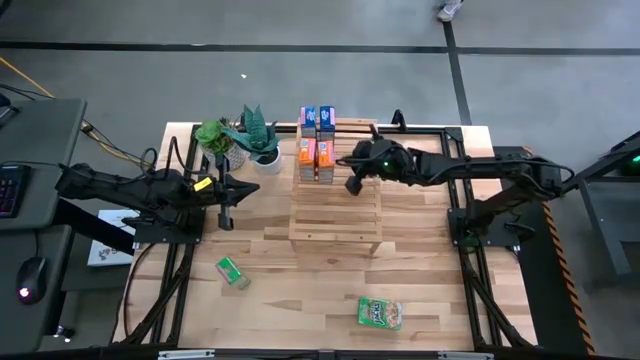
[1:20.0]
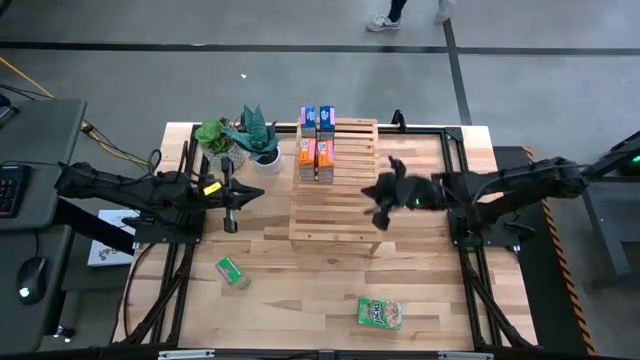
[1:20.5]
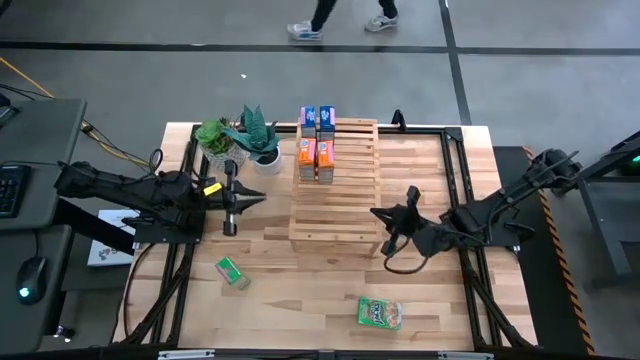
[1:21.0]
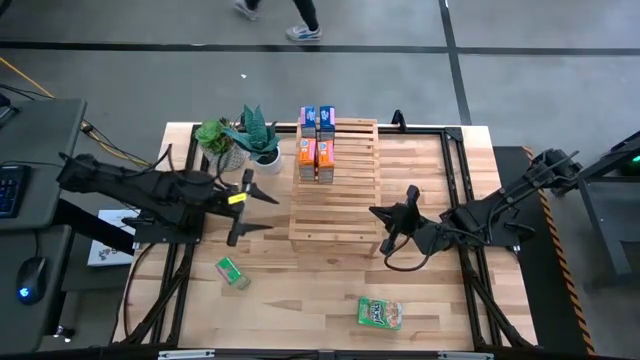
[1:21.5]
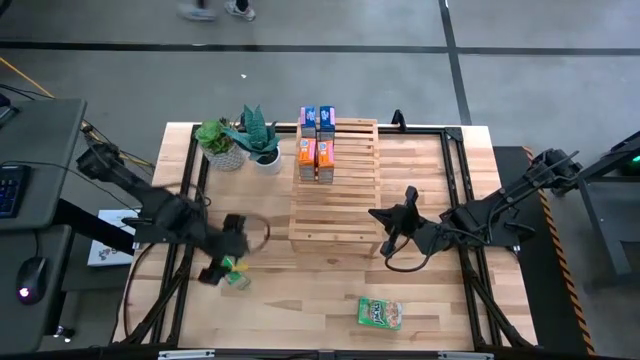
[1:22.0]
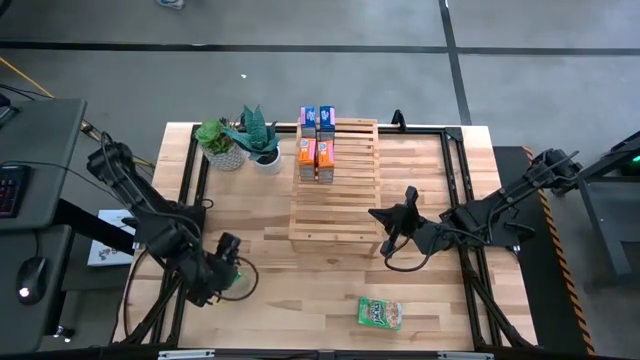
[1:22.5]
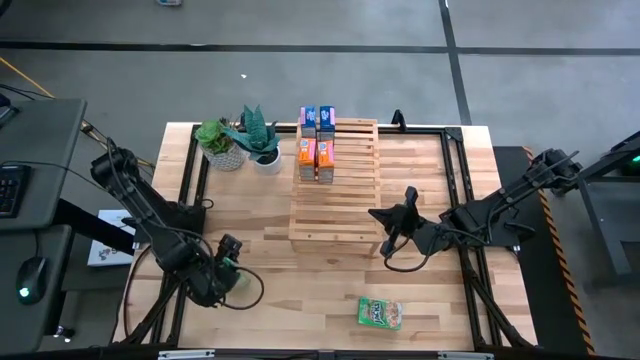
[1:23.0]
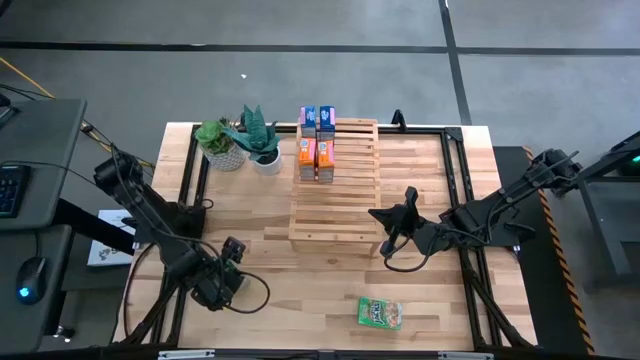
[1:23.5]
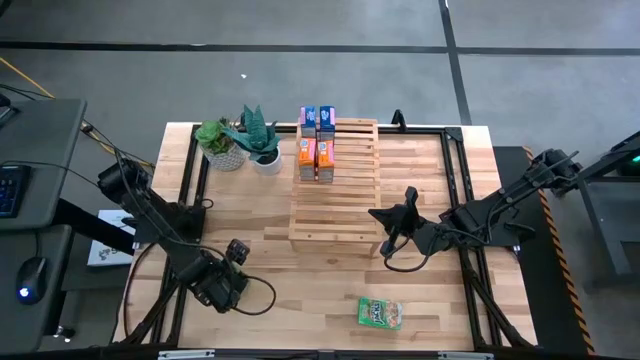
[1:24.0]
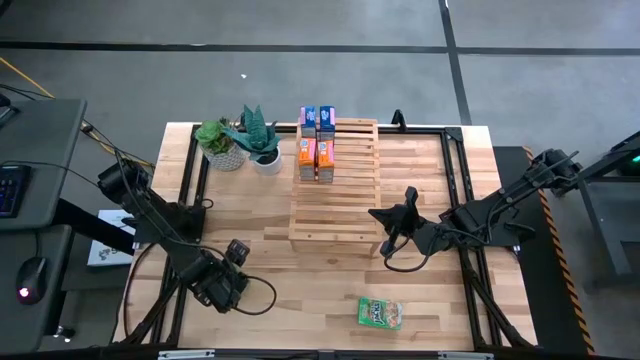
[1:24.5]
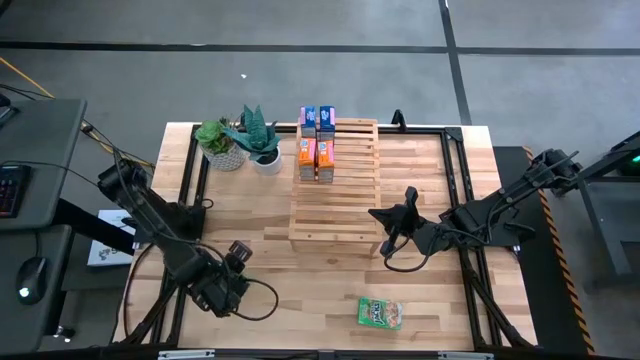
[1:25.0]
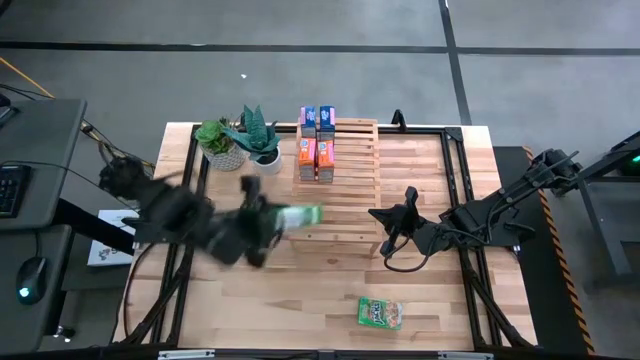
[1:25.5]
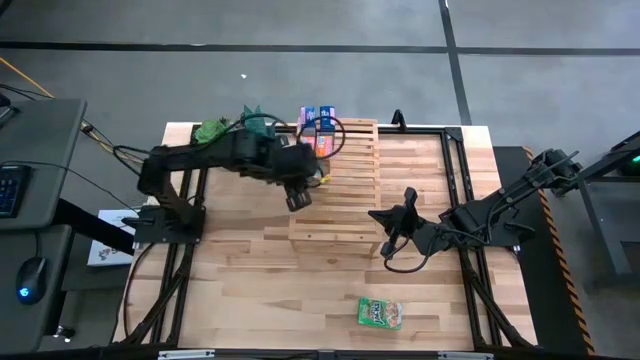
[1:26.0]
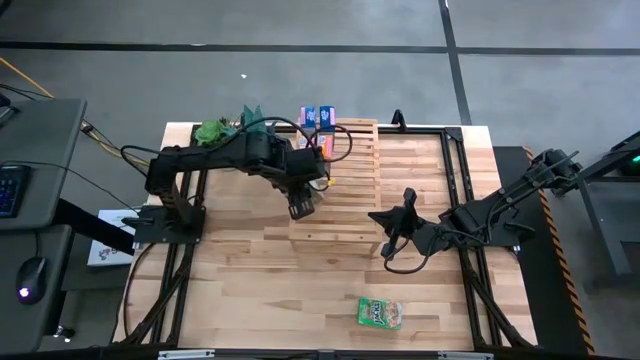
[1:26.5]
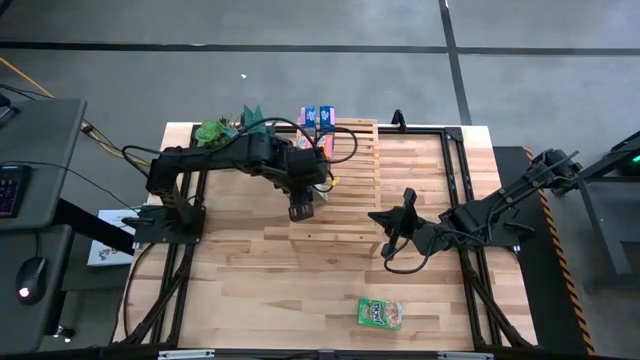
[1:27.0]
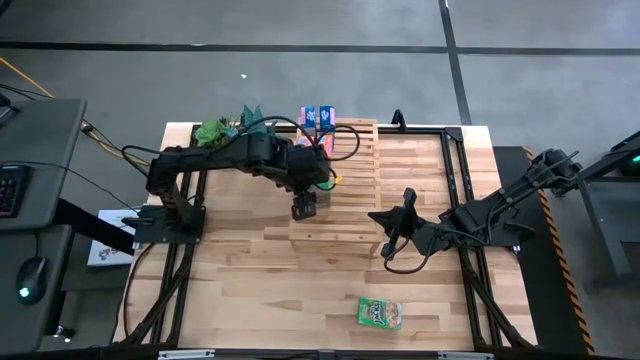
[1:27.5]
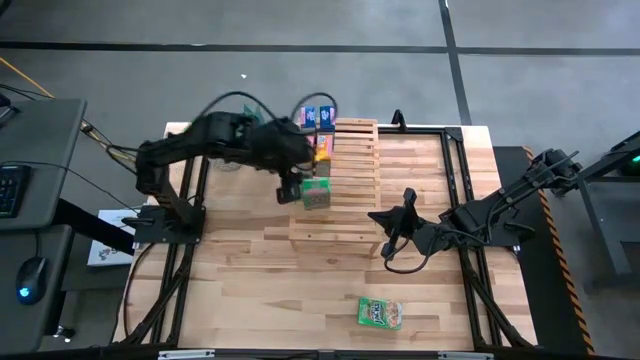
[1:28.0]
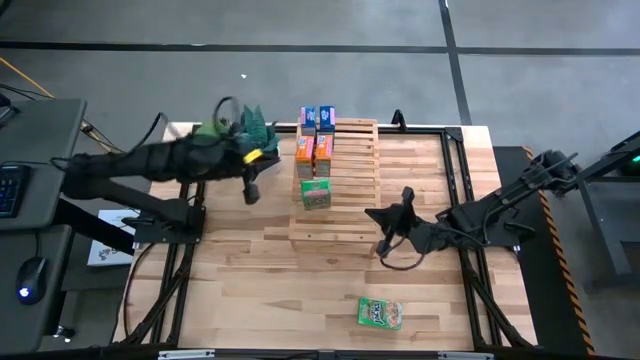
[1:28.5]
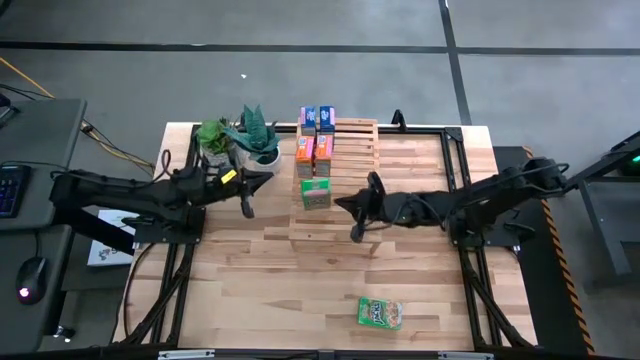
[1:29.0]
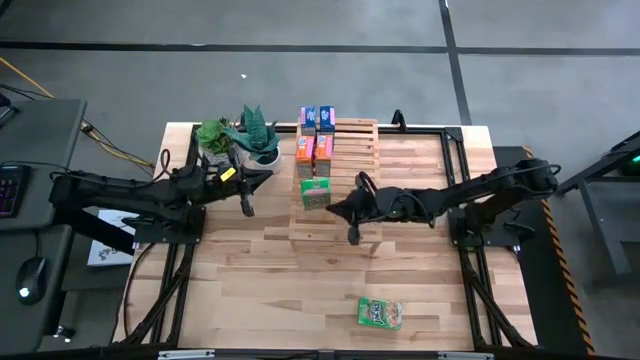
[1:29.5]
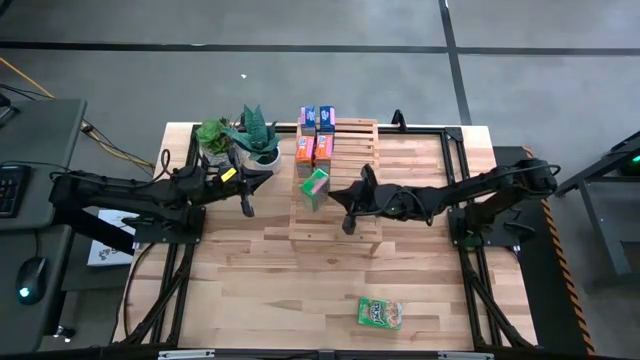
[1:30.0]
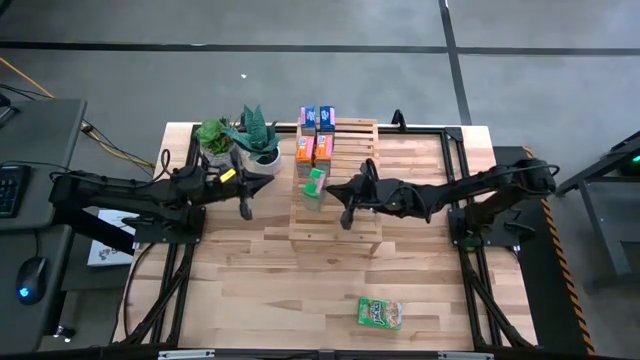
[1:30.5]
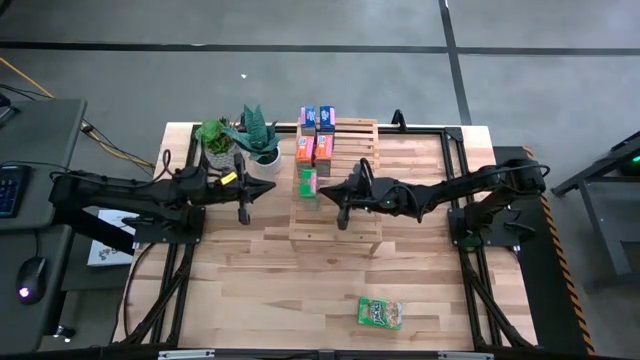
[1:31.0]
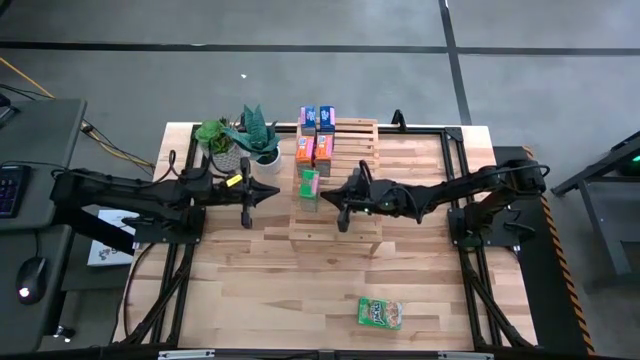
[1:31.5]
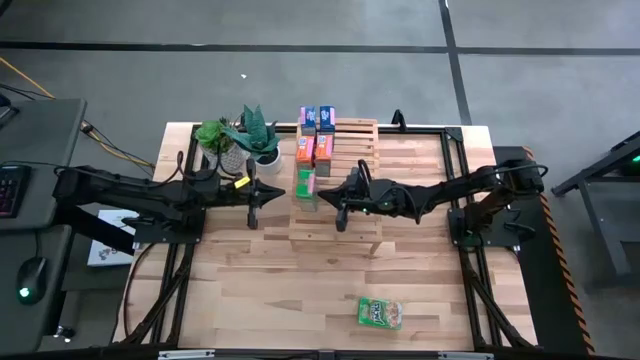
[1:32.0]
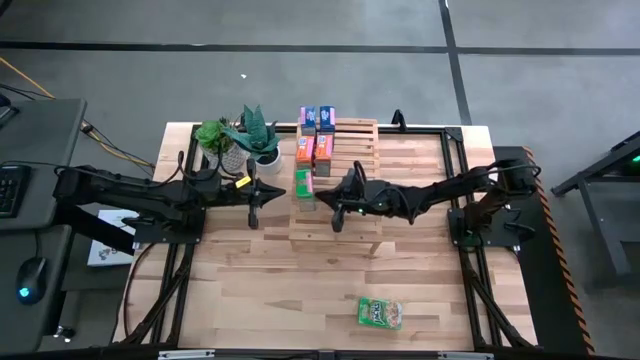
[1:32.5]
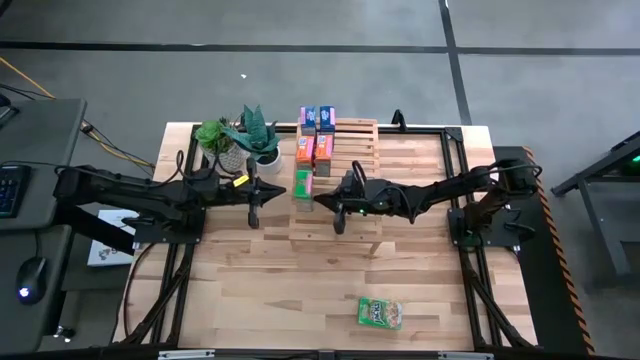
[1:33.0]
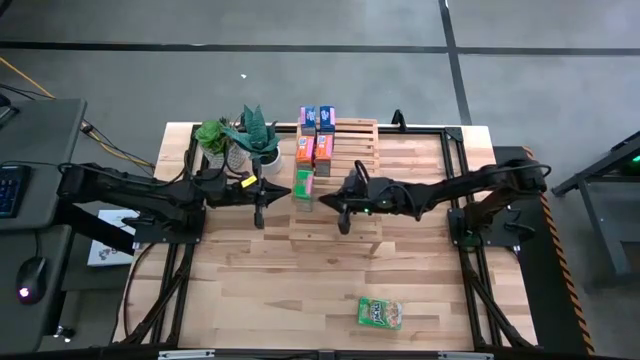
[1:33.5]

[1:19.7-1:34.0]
Task: Stack cereal on shelf
Put the left green cereal box on the shelf

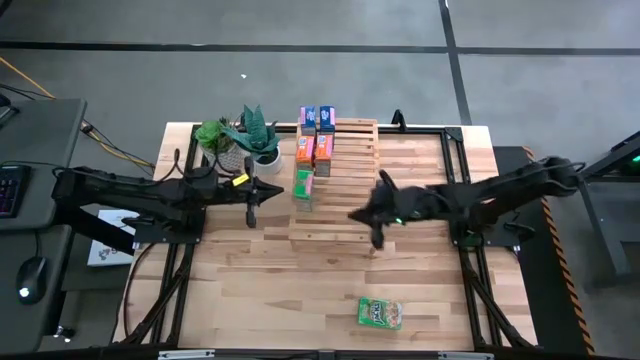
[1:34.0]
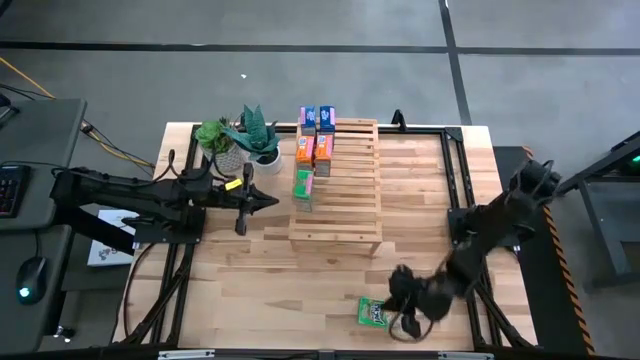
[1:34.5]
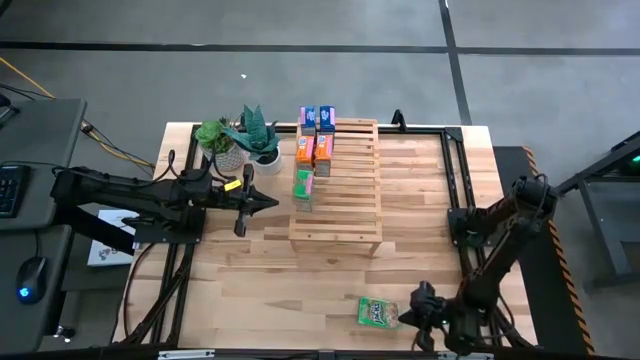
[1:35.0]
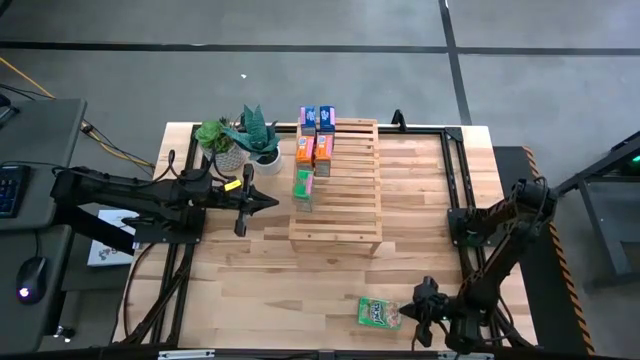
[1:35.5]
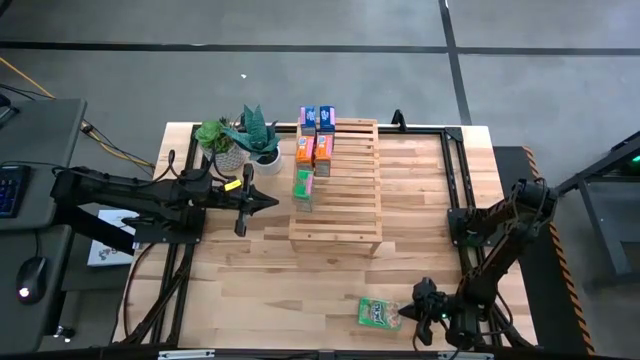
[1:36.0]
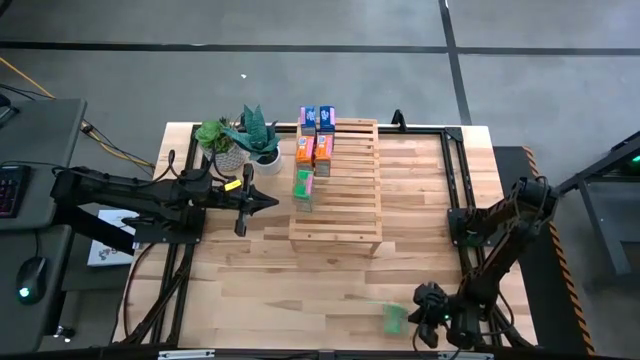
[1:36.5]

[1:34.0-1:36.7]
Put the green cereal box on the shelf aligned with the other green cereal box
